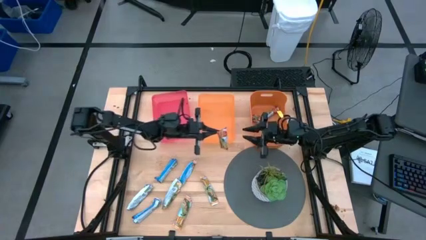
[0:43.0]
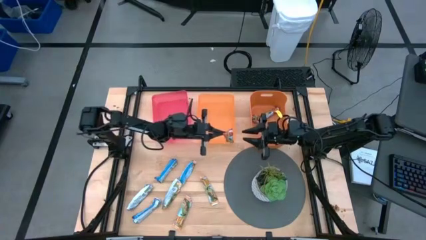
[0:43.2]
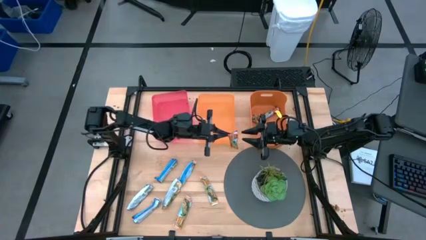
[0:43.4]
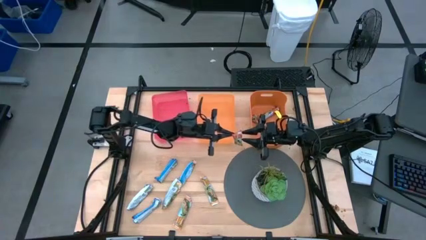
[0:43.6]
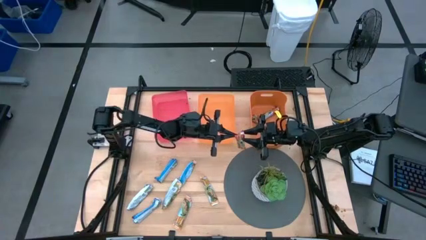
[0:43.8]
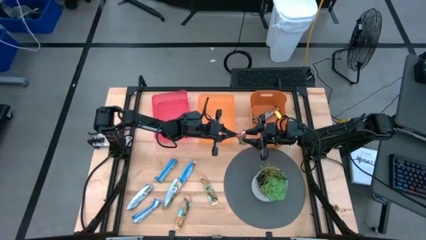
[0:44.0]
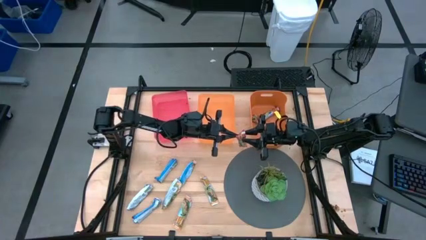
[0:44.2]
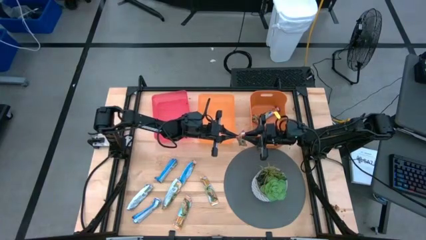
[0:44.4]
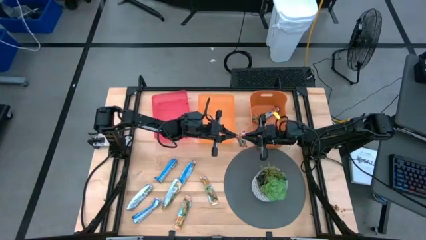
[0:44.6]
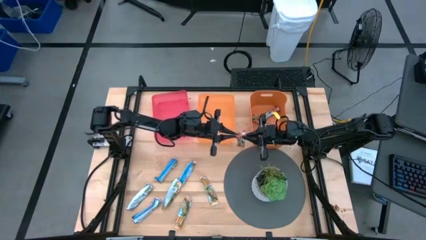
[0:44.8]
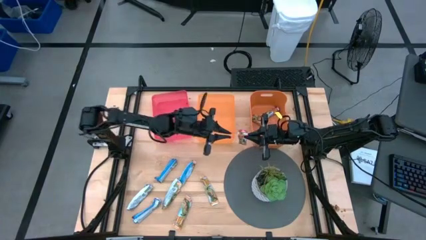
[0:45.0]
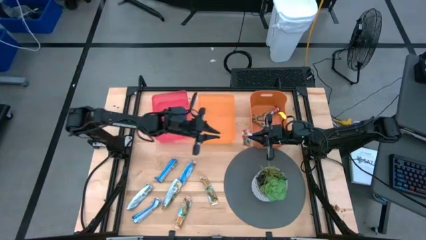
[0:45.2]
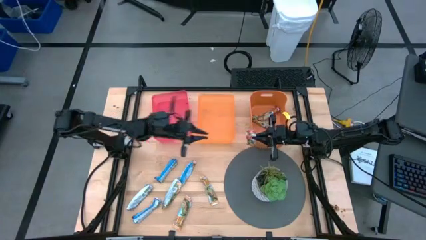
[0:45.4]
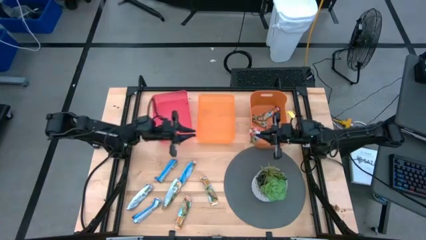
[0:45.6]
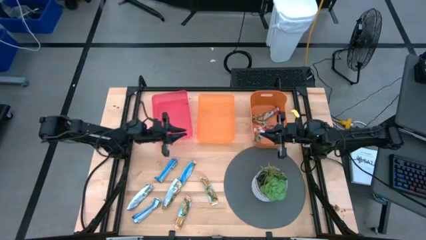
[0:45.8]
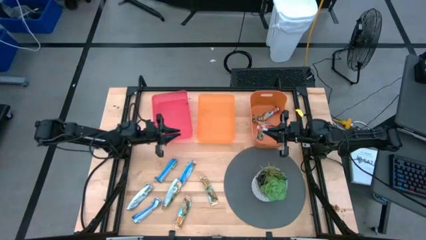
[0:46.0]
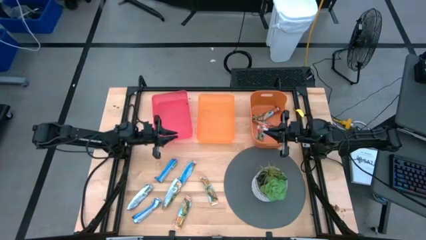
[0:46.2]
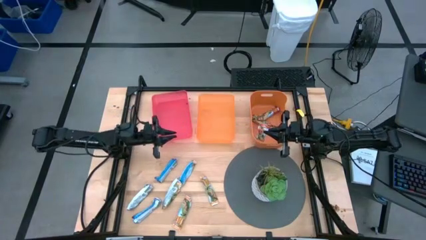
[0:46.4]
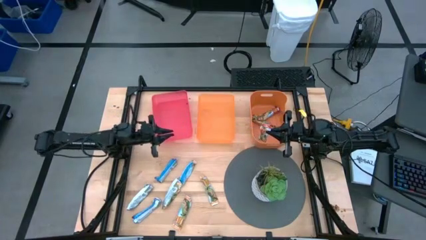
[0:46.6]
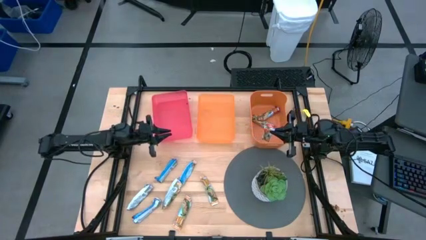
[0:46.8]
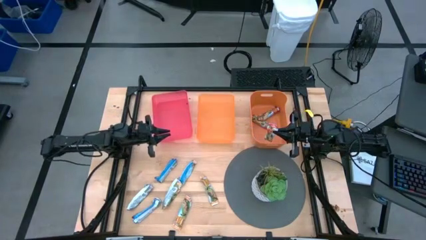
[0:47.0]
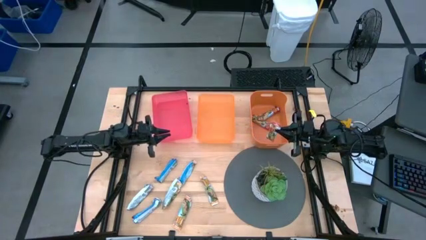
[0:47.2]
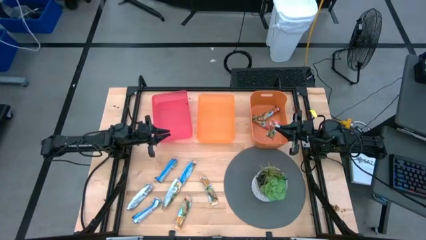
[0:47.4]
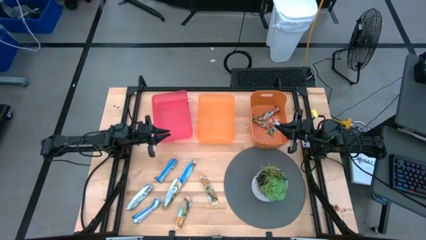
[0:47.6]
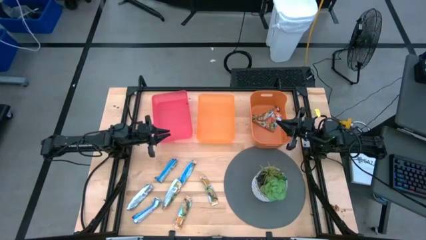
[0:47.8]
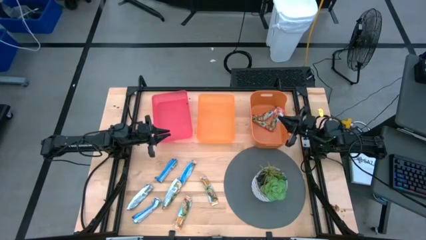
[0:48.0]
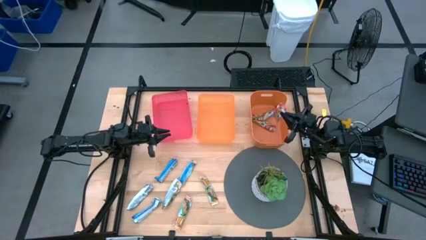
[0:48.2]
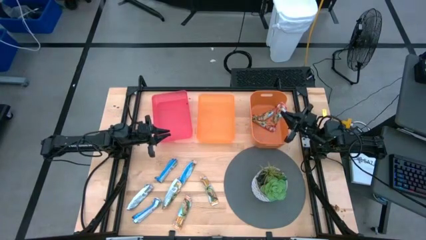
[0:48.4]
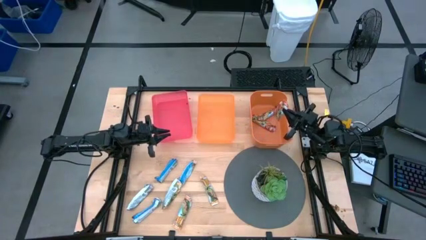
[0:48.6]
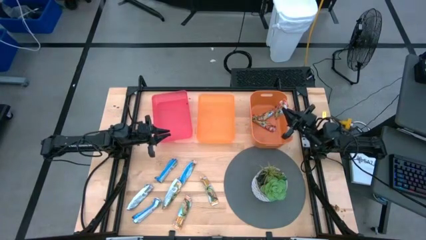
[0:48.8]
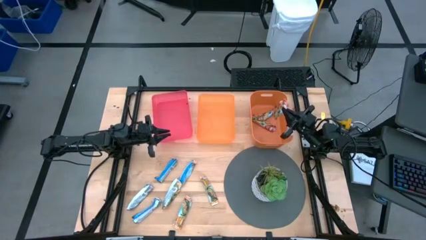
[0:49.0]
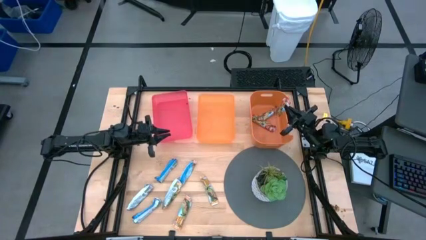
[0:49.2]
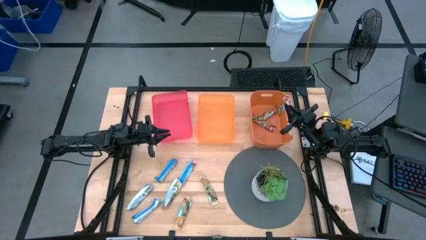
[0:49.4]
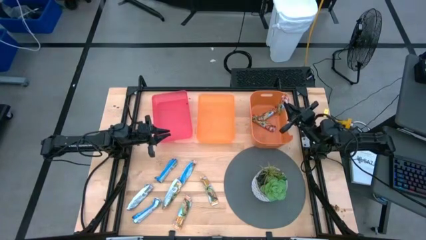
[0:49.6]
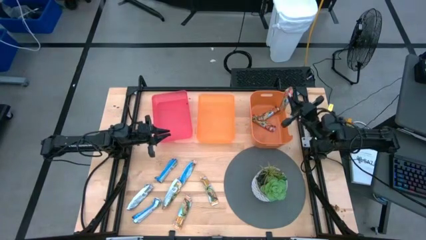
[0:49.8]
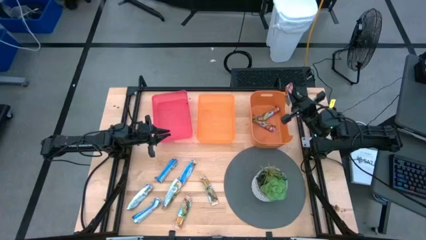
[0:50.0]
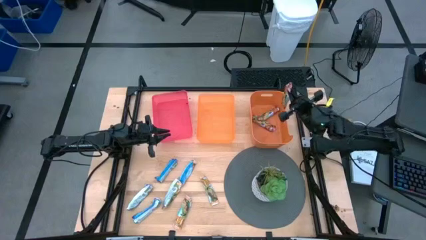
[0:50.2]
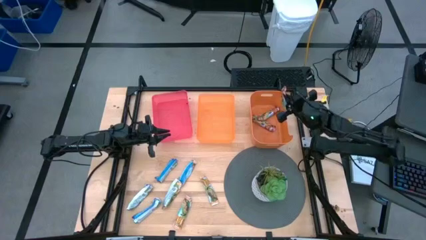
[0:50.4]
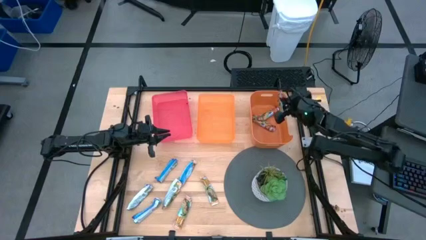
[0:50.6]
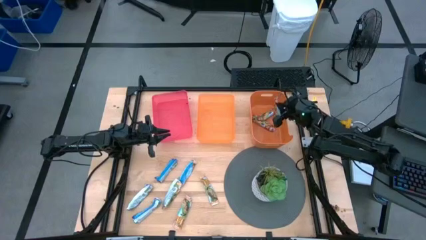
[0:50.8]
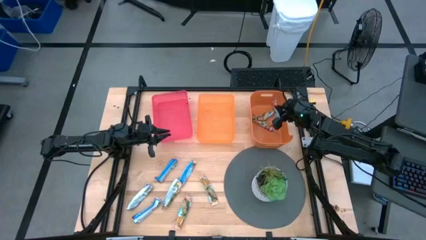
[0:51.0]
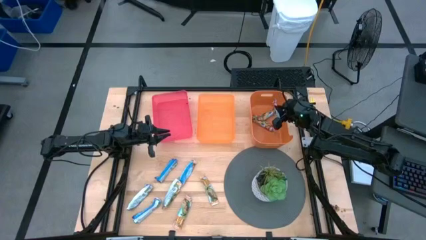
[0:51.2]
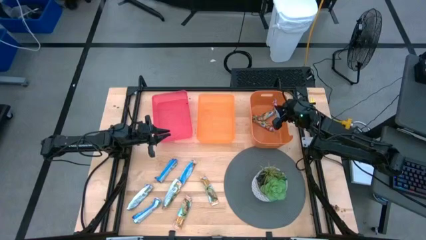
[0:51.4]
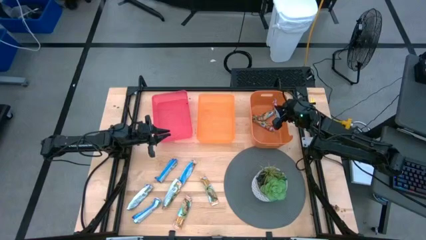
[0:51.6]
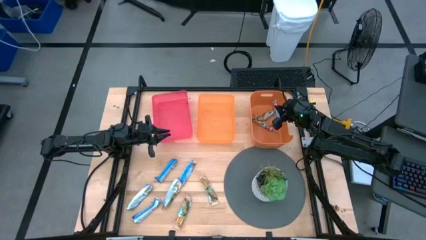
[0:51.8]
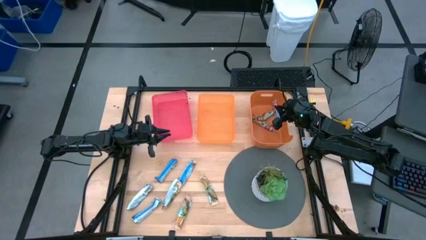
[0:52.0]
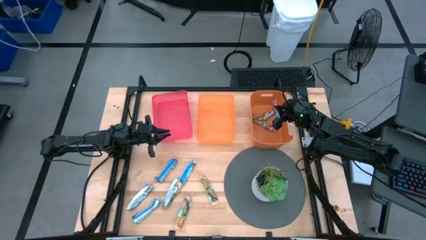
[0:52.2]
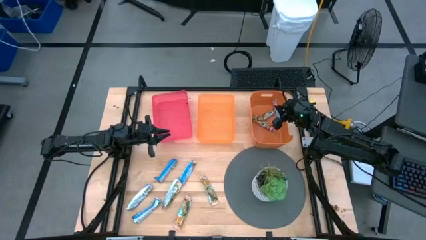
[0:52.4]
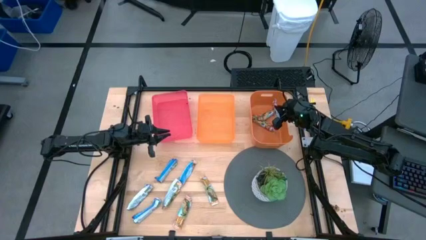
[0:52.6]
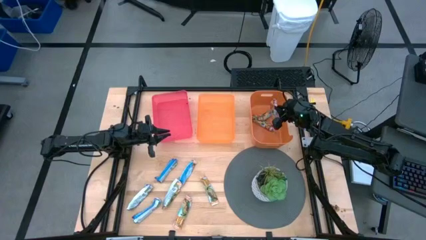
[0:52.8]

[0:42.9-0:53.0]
Task: Pick and place Granola Bars by type
Put the red granola bar into the right orange bin

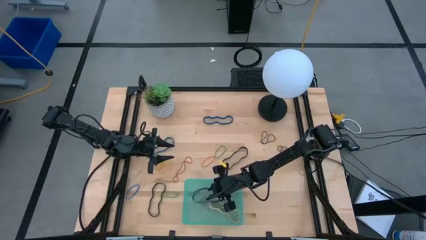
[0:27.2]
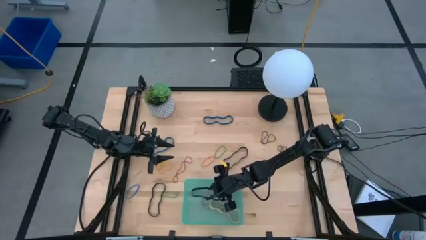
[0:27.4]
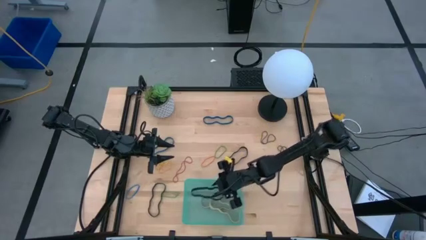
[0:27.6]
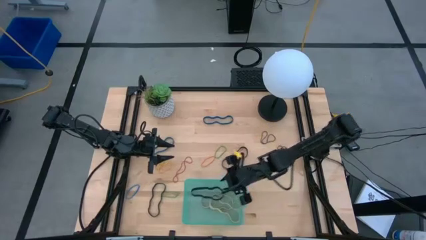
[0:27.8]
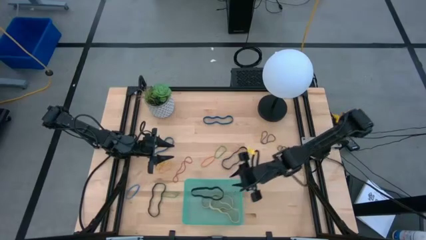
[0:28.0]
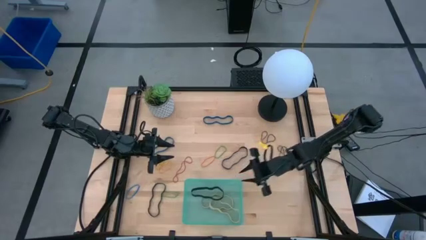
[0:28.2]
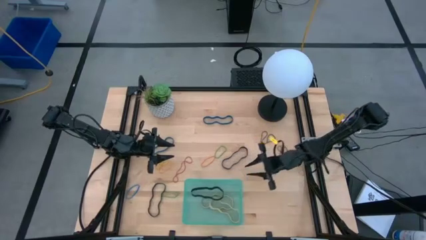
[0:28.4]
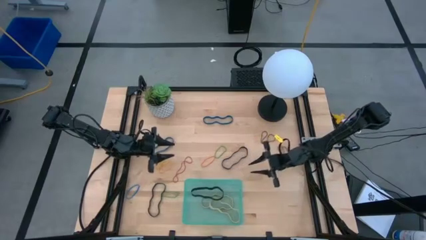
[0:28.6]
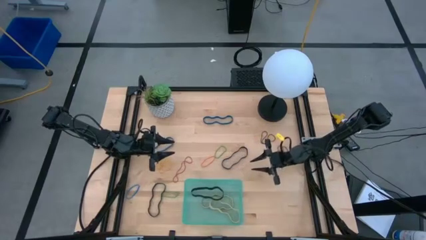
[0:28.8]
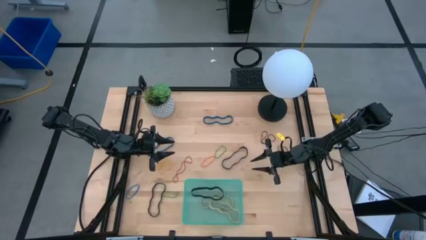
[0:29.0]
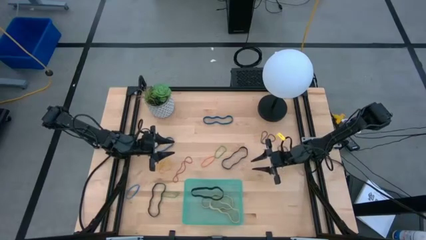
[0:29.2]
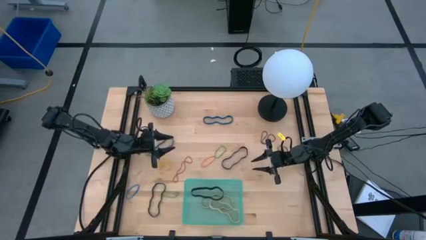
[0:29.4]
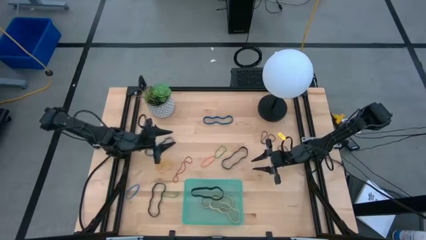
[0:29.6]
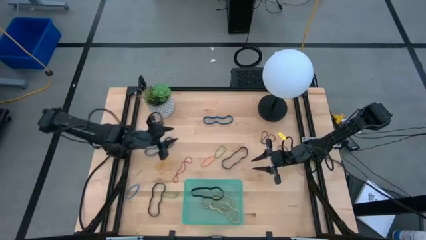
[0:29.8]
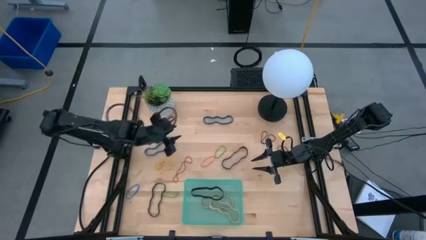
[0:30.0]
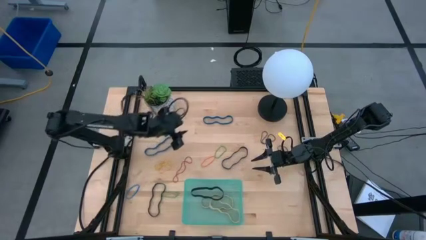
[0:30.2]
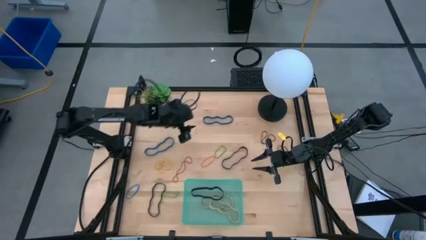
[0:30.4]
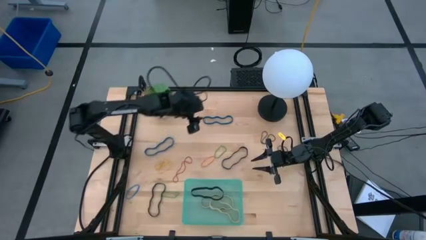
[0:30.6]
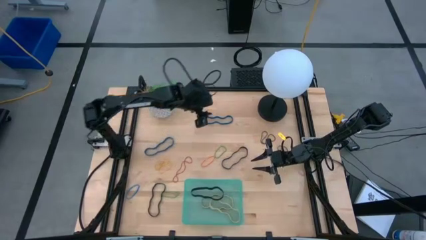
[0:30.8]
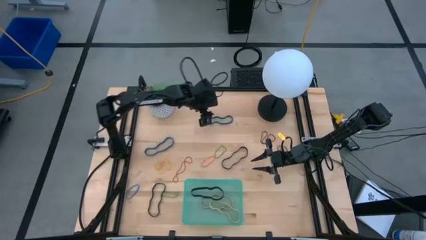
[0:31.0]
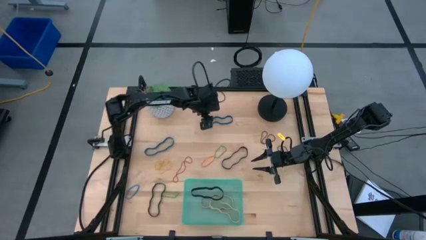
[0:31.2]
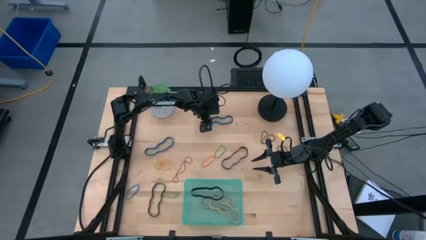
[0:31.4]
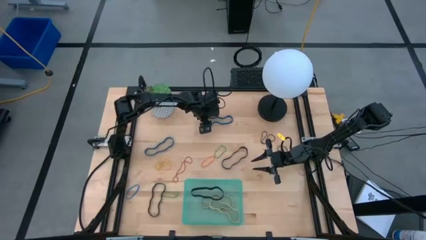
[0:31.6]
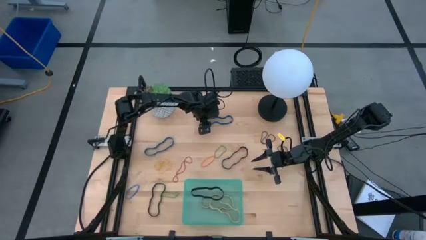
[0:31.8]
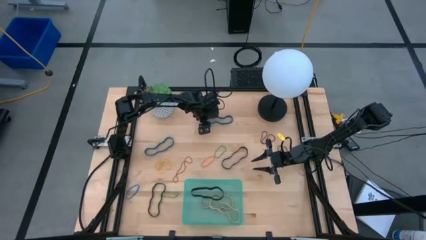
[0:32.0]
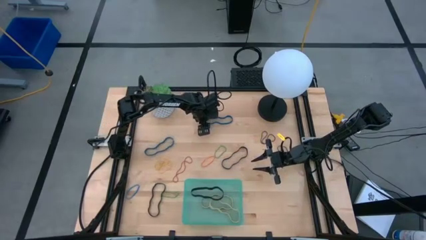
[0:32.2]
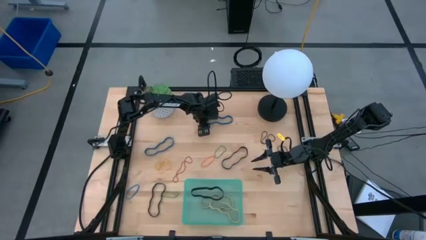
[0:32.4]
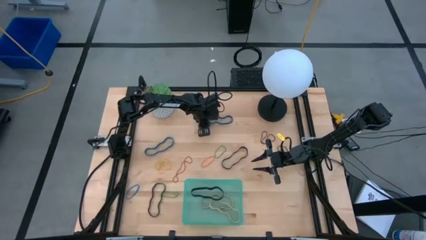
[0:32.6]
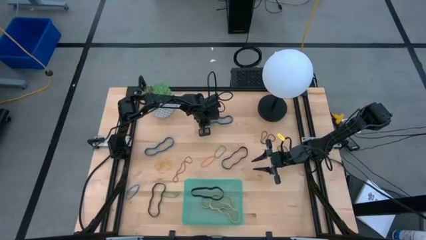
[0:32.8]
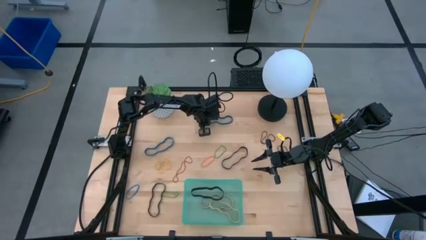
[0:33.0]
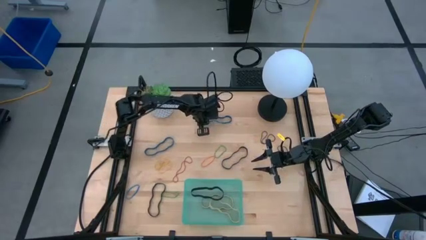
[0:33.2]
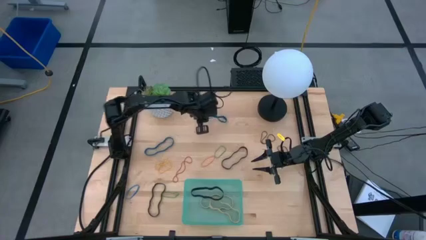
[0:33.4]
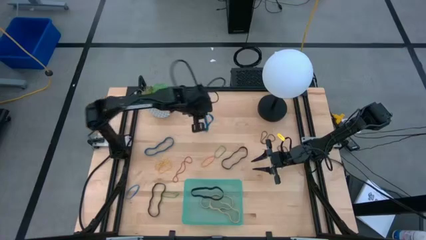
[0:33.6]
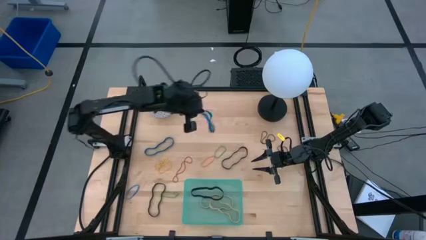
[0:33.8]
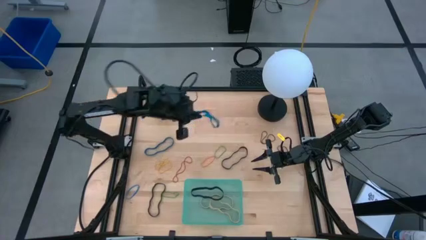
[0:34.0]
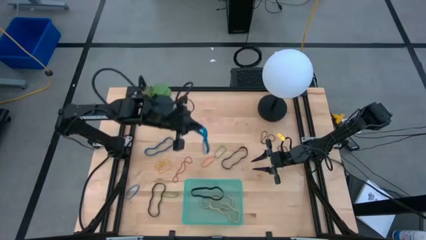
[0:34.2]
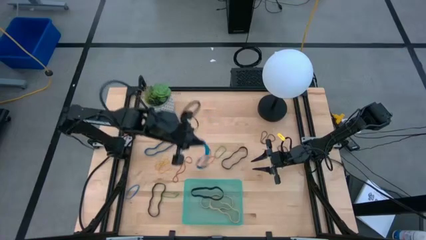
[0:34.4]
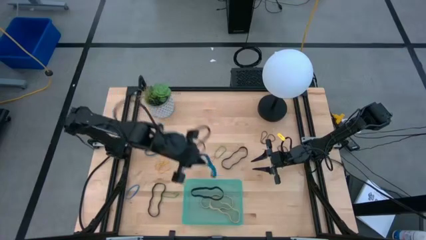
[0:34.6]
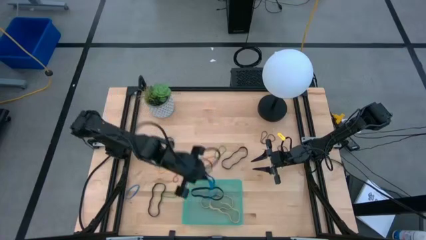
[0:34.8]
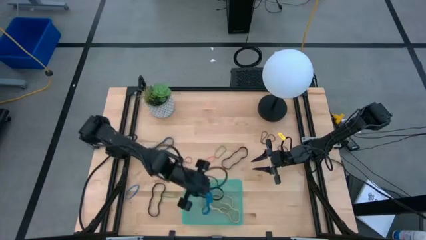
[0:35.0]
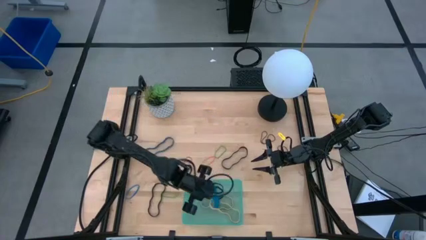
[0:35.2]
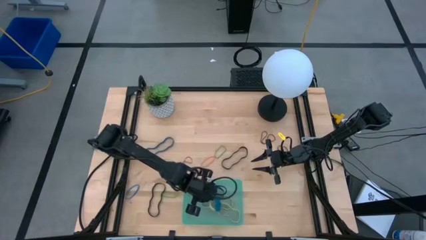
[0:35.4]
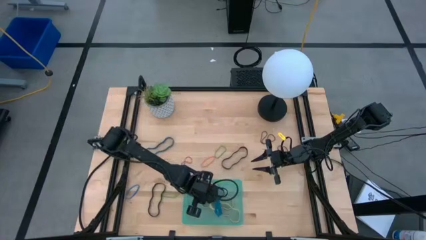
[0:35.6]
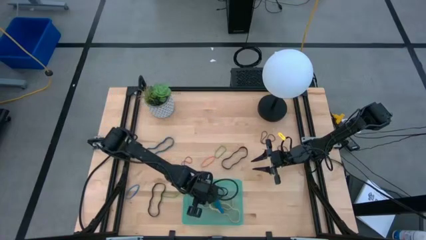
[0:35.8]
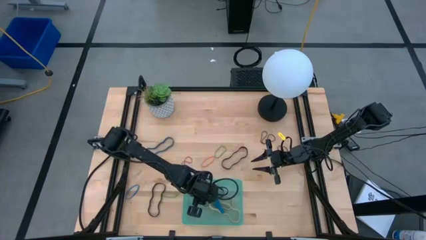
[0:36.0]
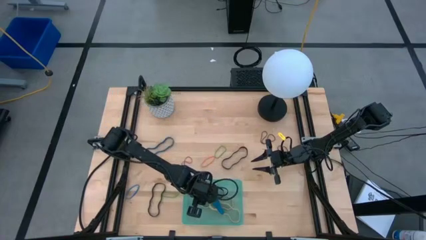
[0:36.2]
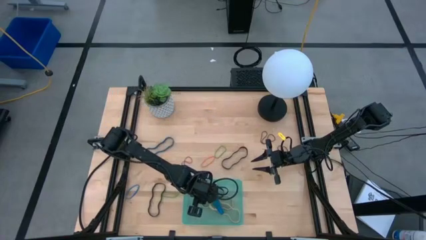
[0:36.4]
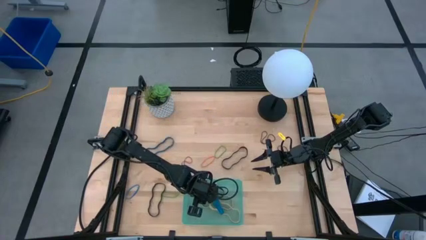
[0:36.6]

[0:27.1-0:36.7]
Task: Pick and place rubber bands into bin
Put the top large blue rubberband into the green bin
